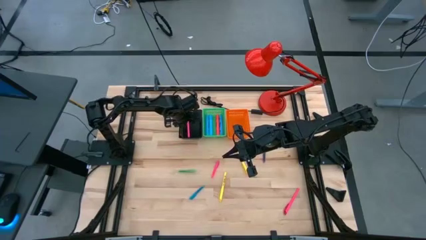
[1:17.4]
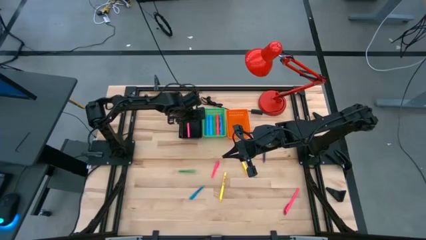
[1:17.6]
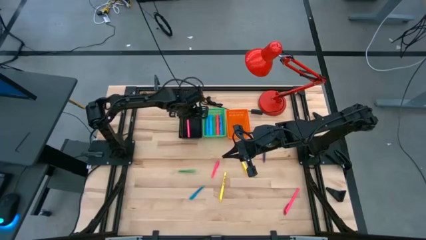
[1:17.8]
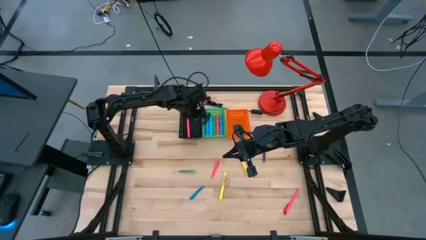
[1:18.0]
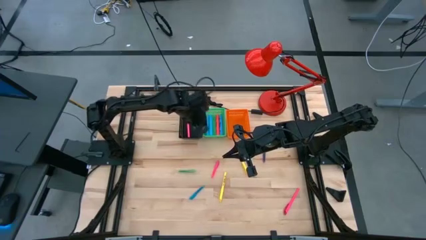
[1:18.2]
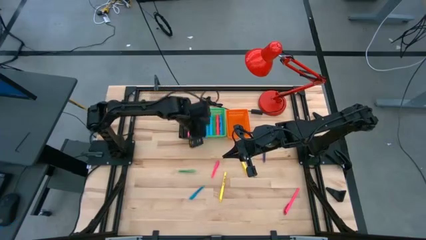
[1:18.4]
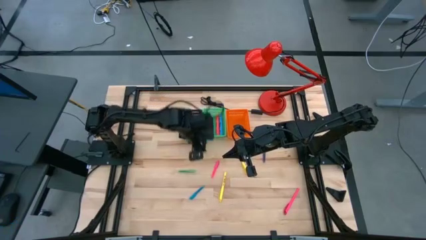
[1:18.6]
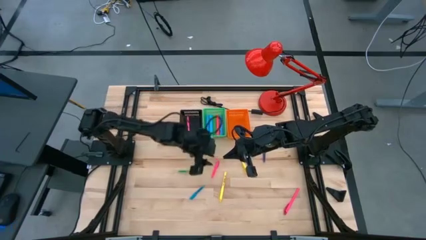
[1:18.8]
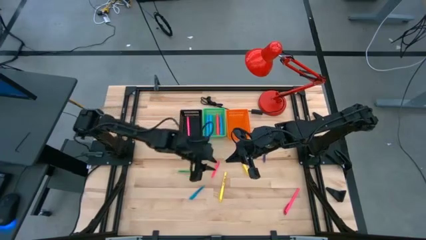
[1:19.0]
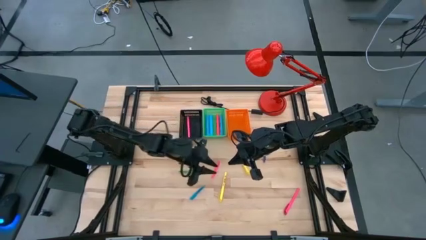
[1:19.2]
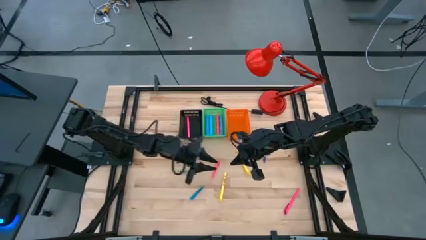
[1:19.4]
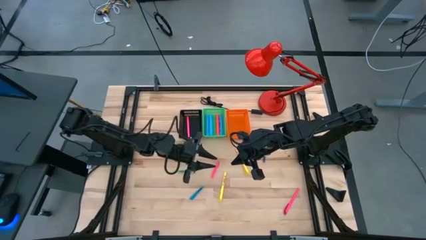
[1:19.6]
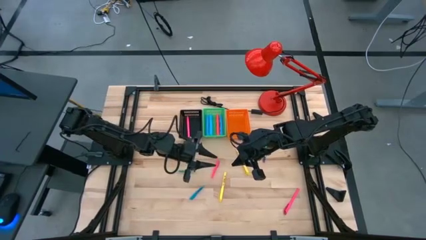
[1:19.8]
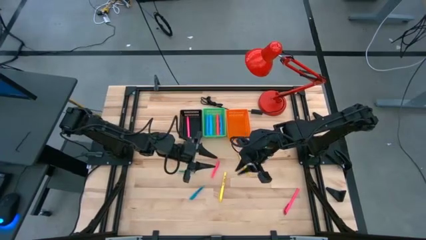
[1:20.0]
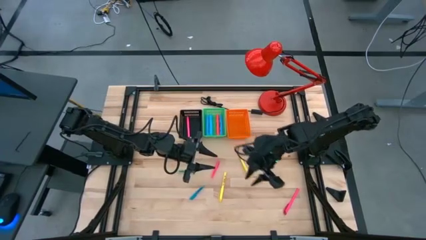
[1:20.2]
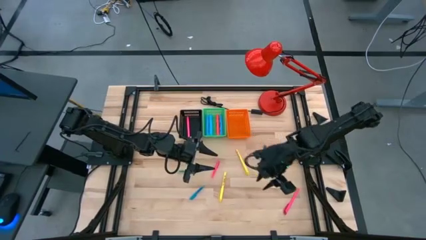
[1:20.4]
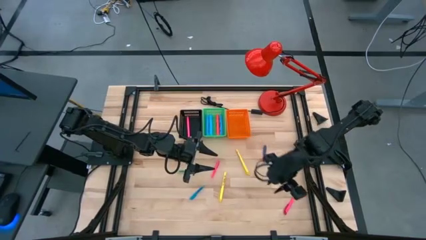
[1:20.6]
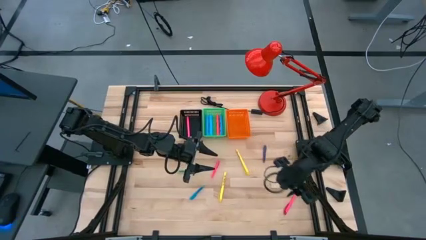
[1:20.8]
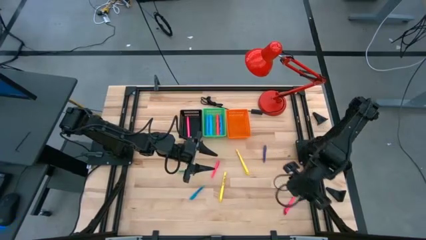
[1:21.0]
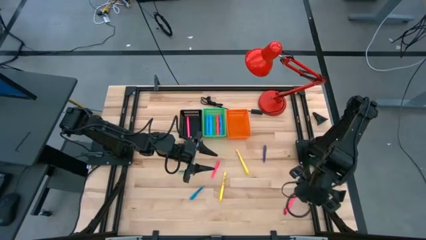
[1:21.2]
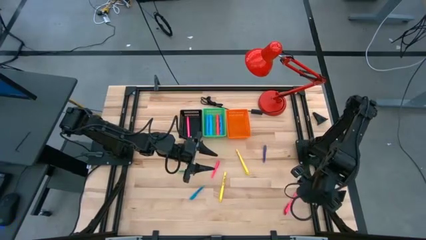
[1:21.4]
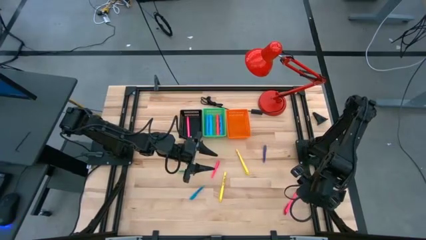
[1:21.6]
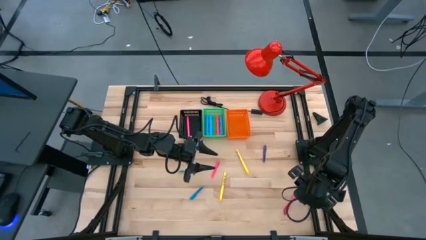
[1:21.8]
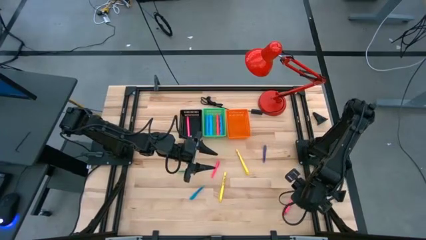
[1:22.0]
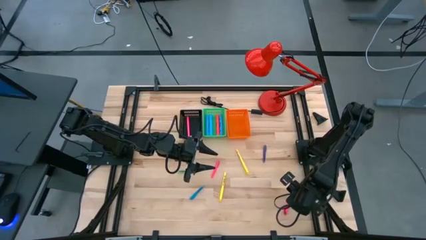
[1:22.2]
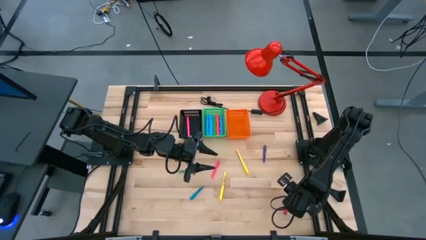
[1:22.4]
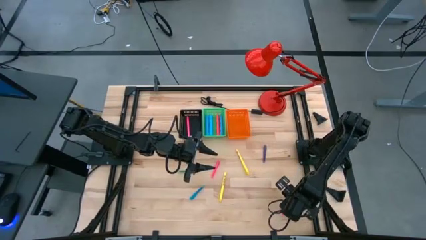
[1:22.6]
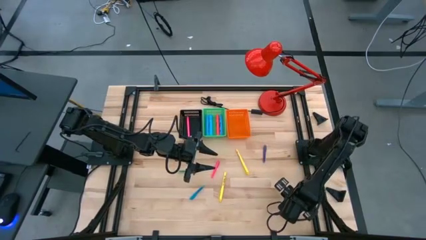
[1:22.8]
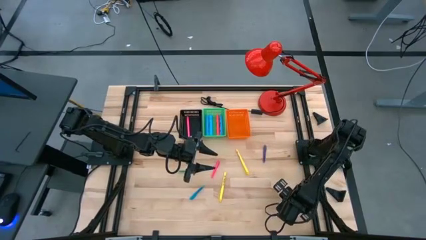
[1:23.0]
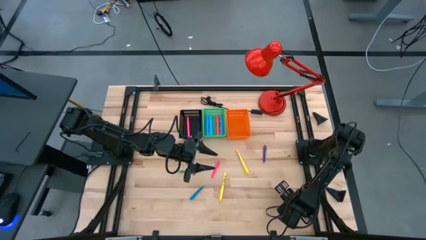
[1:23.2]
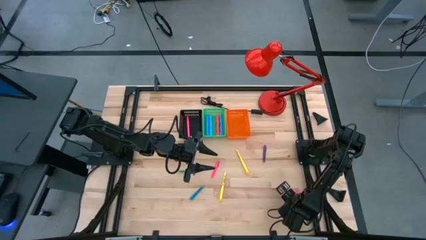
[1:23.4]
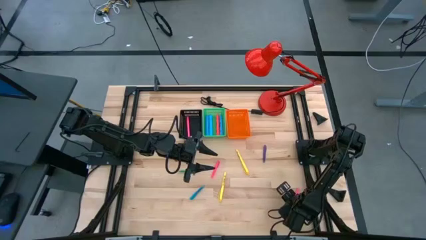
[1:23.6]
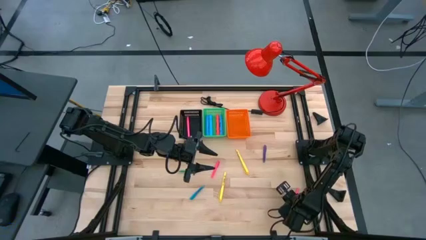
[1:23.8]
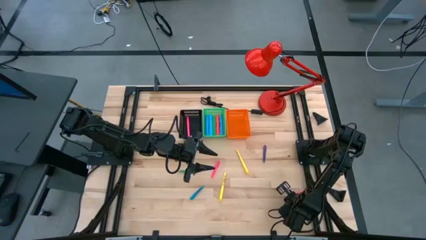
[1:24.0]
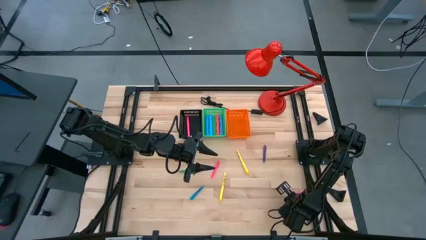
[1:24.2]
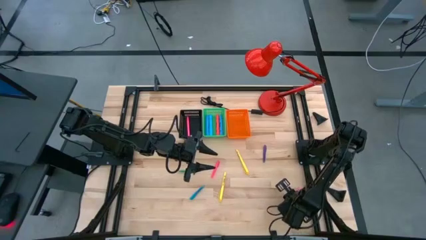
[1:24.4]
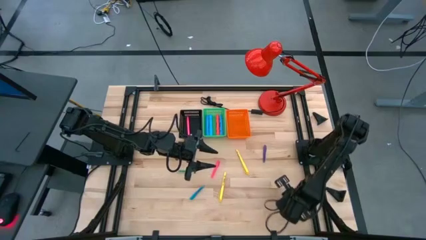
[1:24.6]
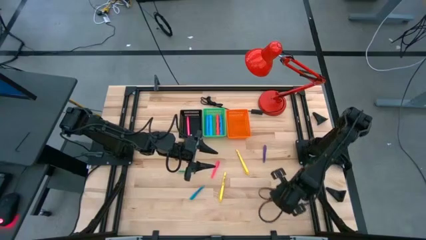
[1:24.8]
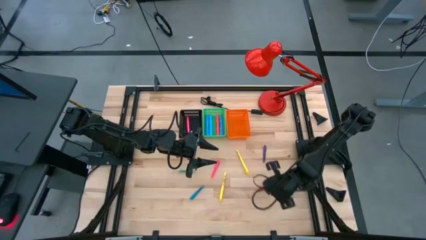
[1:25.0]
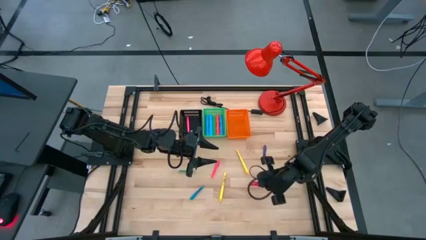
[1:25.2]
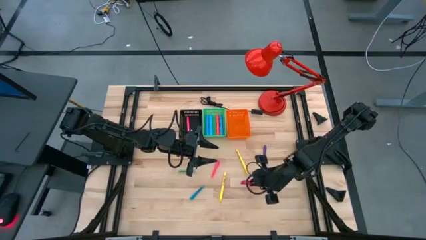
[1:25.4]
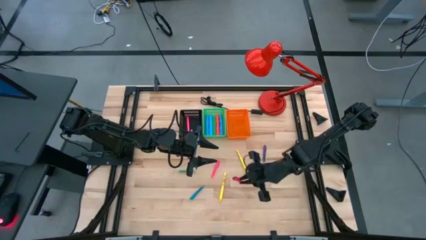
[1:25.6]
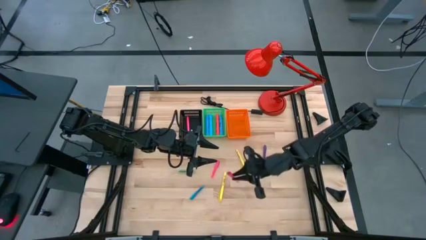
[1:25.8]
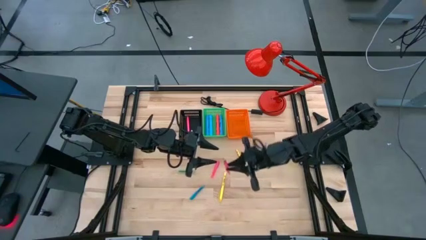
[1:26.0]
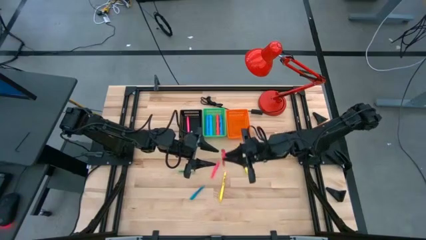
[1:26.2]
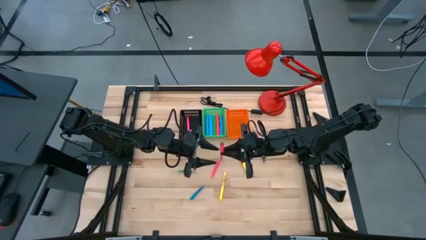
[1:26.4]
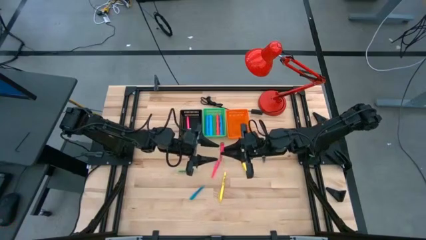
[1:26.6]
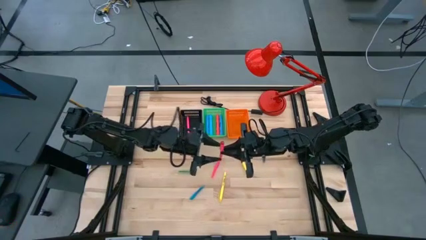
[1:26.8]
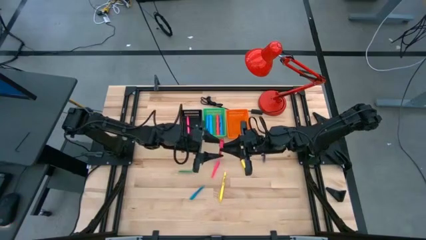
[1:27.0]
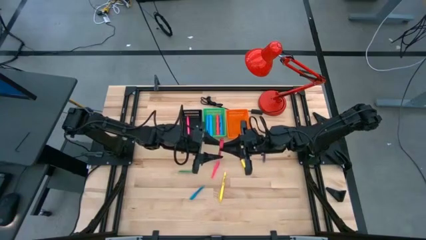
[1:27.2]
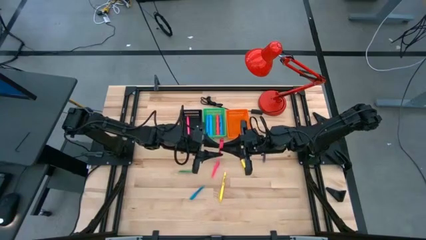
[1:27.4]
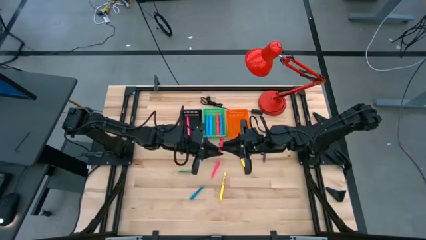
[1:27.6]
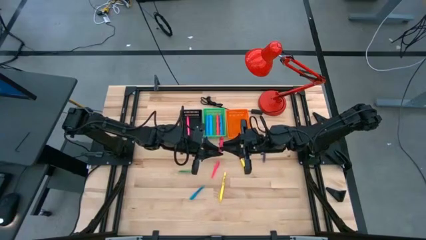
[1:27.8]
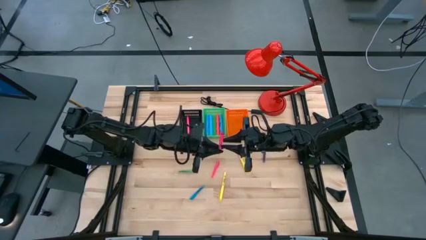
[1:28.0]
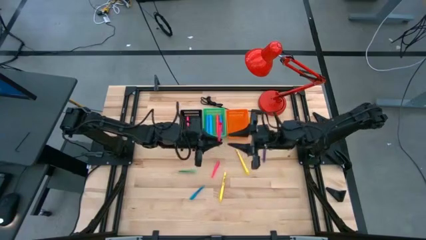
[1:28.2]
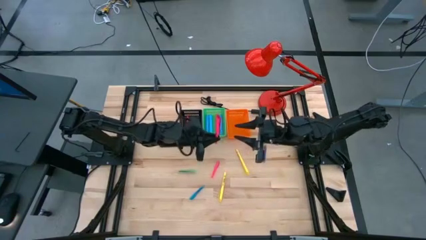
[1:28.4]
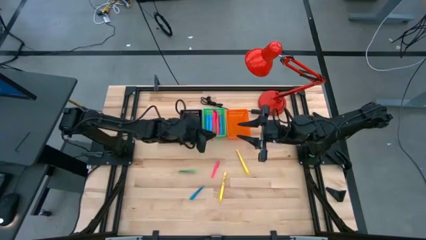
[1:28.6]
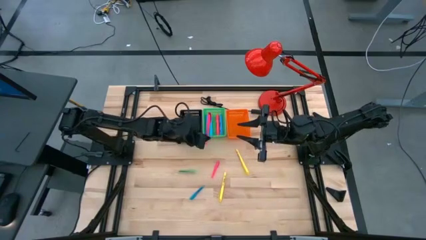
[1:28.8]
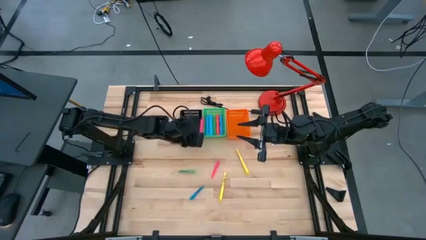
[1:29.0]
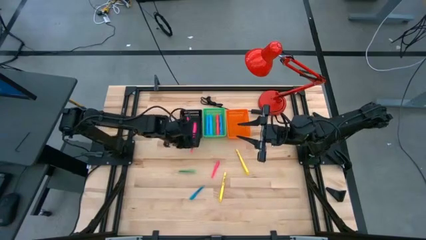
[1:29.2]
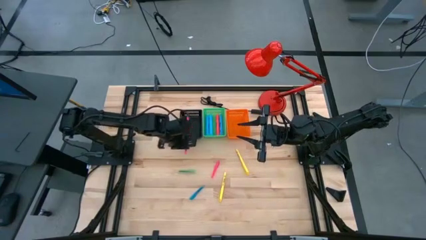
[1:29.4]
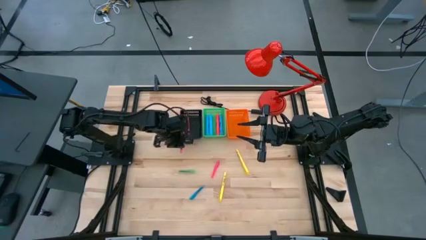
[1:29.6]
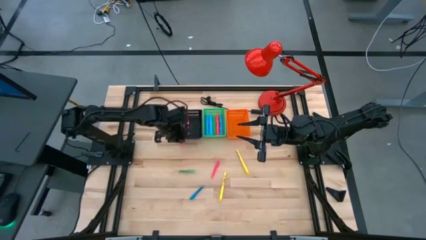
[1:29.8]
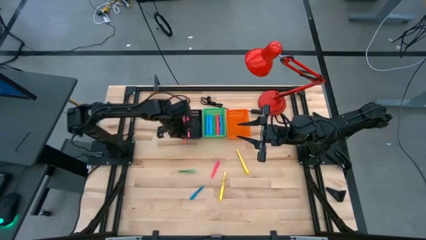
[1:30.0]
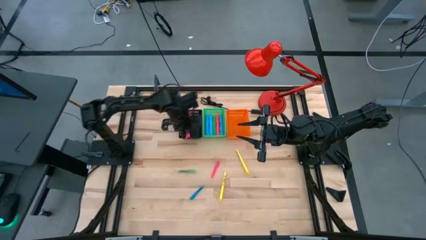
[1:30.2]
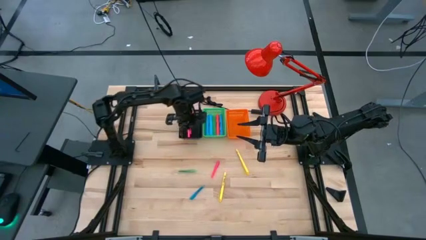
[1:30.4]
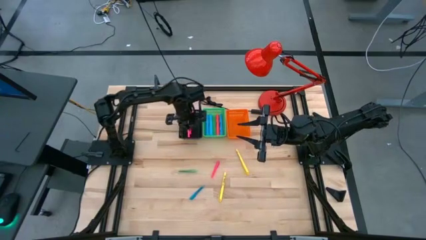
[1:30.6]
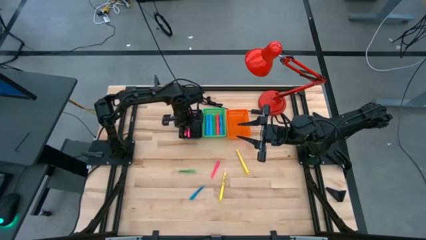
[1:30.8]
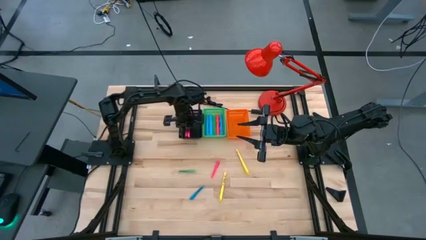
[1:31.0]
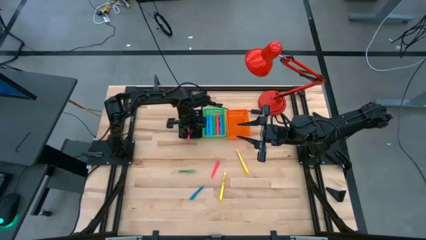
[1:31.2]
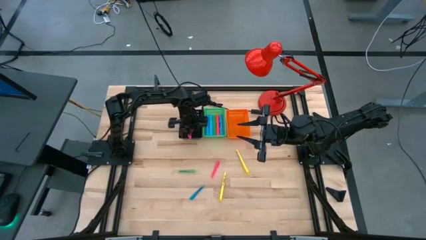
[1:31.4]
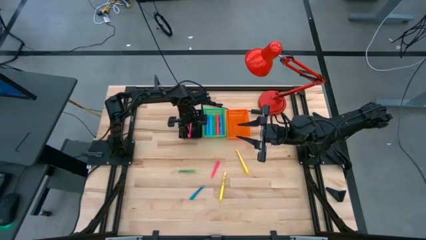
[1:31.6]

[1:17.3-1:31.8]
Task: Pick & Place Markers
Put the large pink pen into the black bin

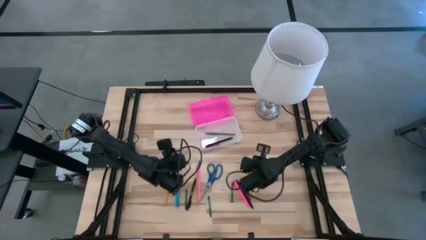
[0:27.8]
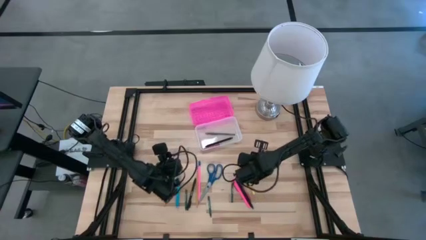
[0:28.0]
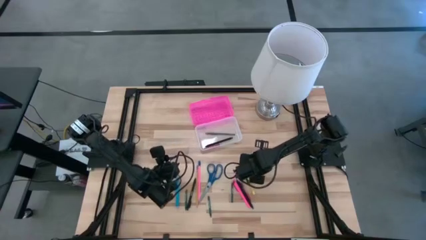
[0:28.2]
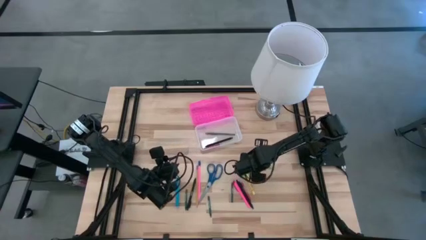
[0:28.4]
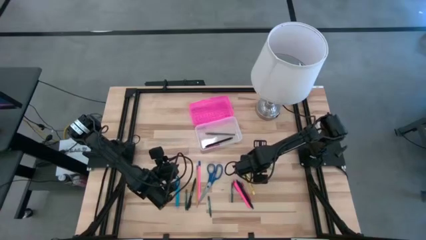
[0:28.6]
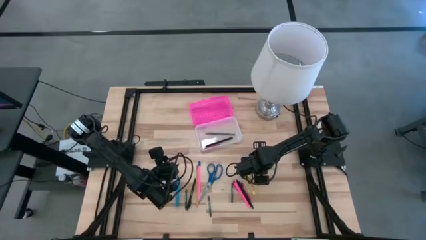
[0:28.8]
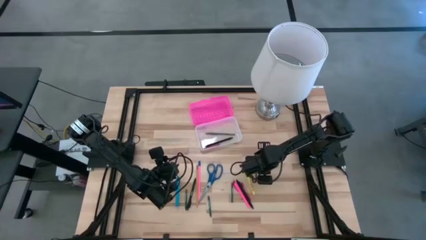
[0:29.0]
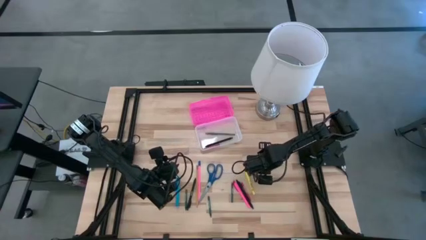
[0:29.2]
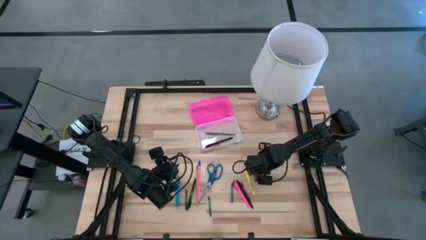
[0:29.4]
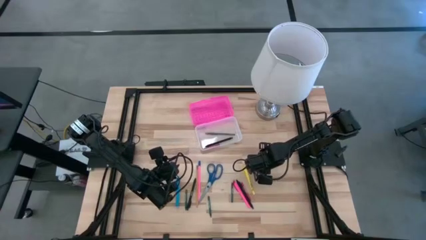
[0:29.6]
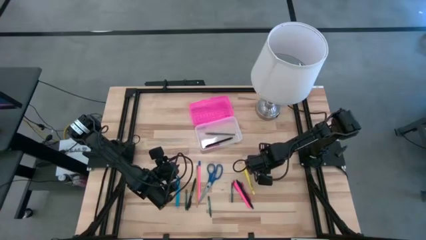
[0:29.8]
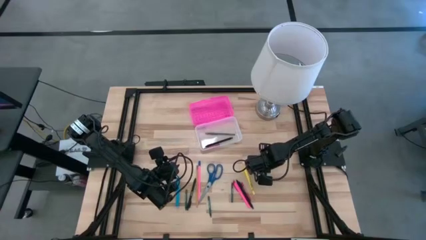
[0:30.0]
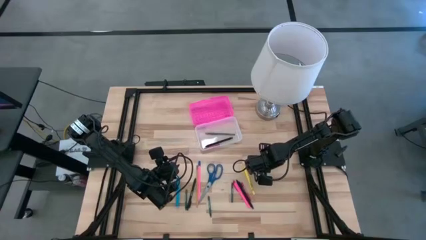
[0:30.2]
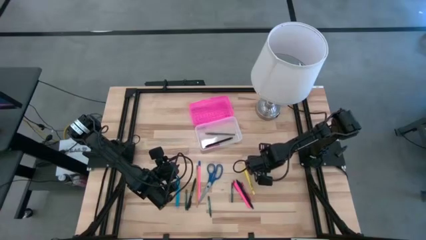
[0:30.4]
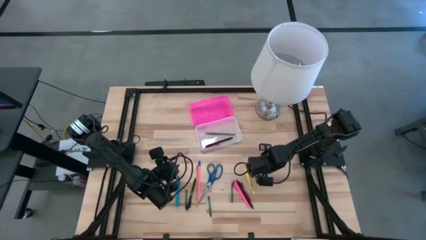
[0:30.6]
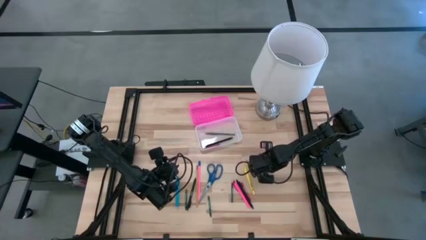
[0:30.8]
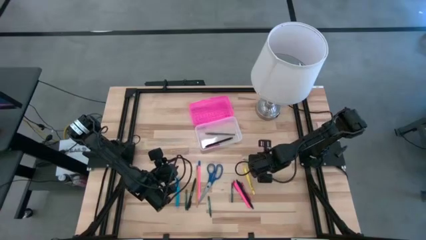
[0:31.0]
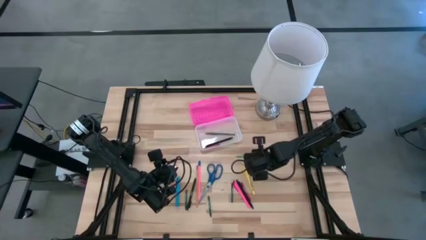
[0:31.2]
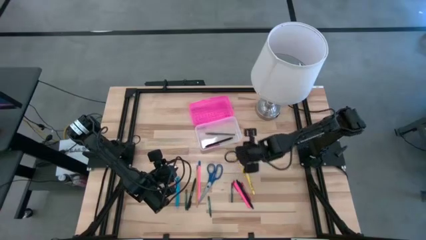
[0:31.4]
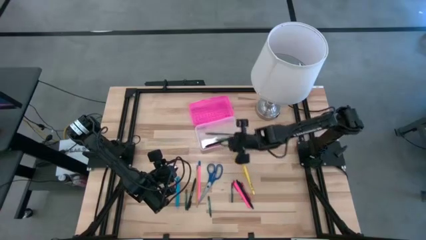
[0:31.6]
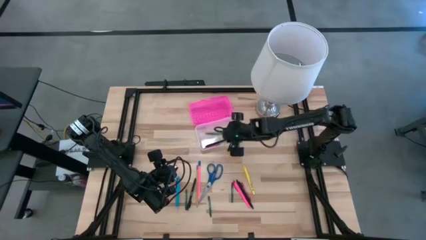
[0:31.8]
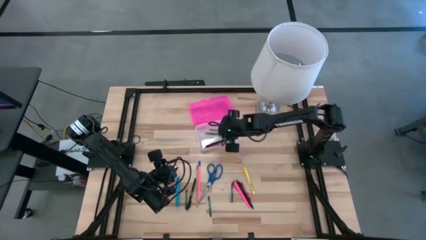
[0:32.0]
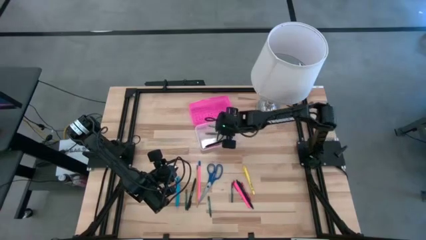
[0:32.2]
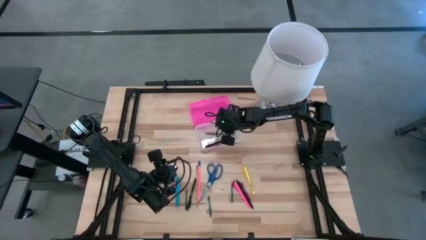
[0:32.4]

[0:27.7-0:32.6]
Task: Pick & place school supplies into a supply box
Put the green pen into the pink supply box
